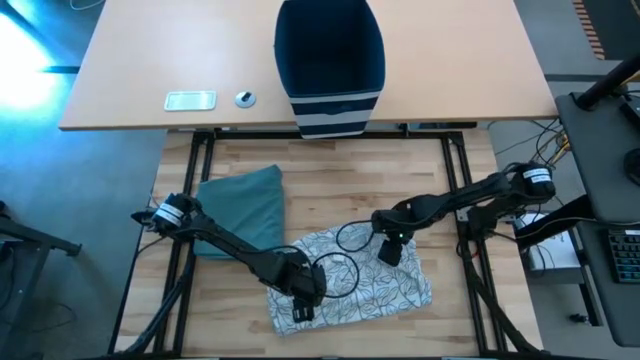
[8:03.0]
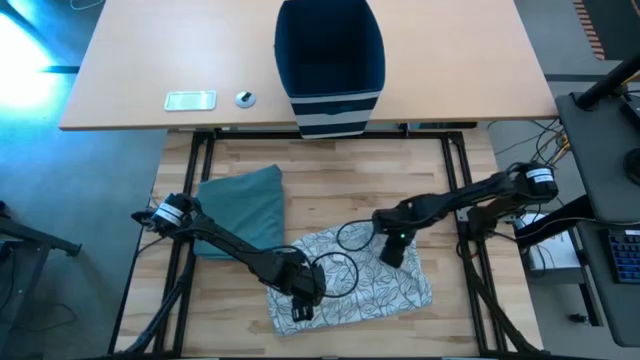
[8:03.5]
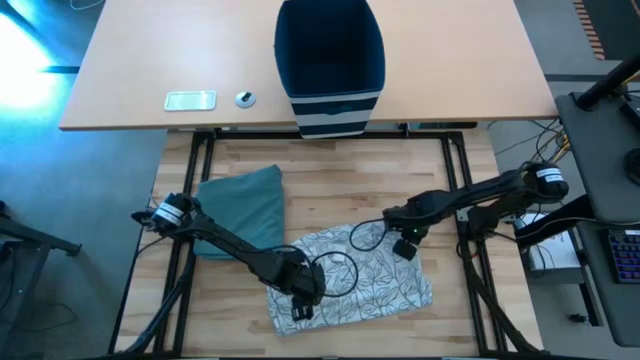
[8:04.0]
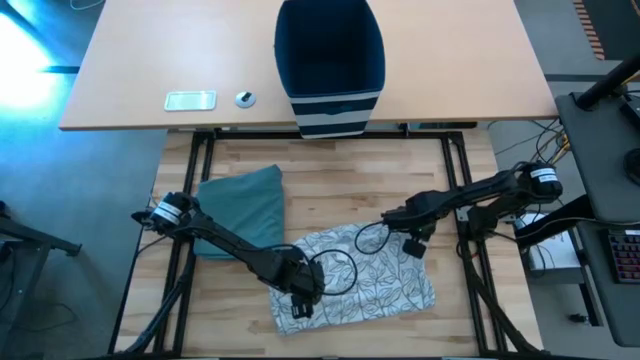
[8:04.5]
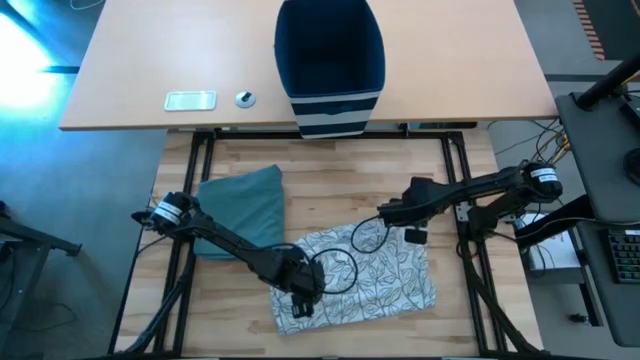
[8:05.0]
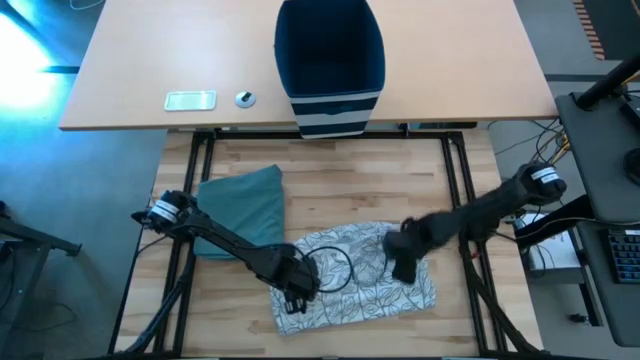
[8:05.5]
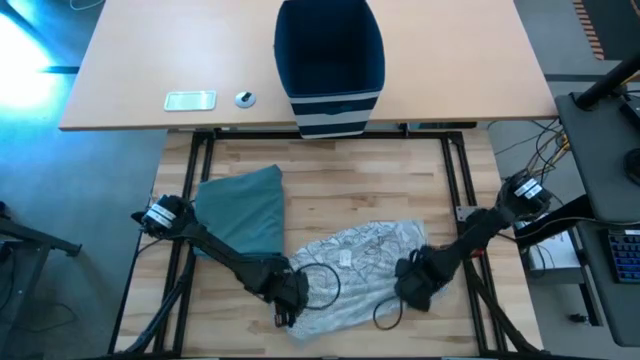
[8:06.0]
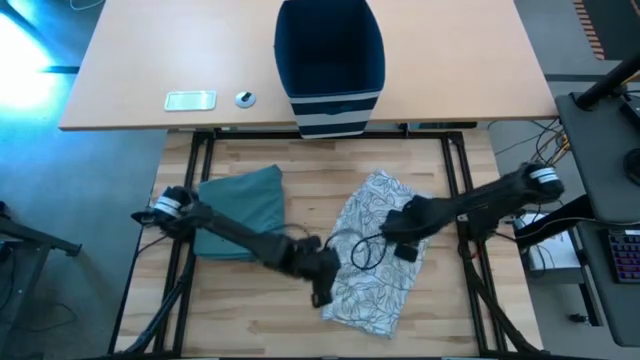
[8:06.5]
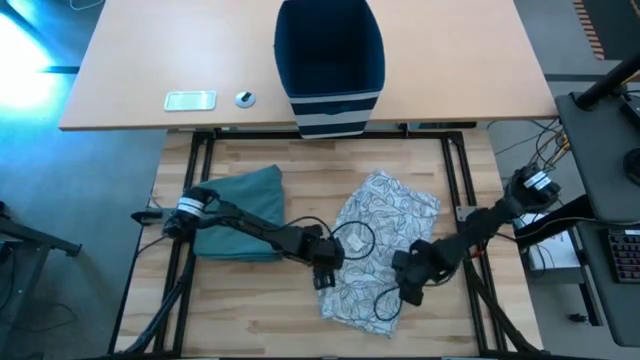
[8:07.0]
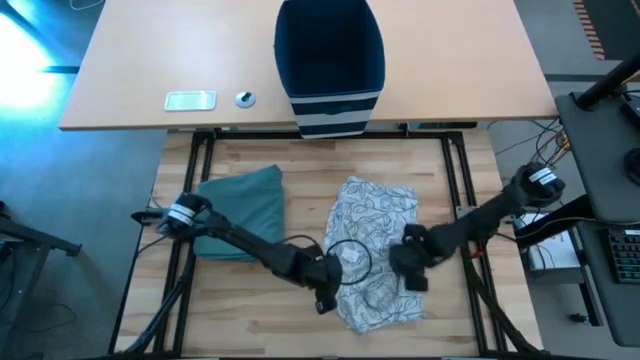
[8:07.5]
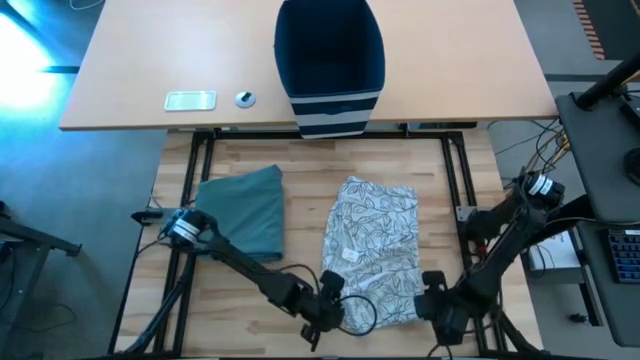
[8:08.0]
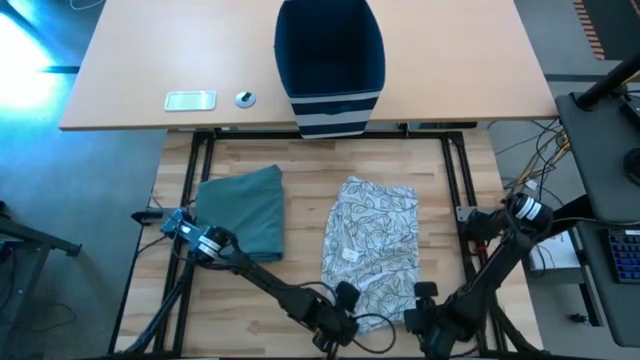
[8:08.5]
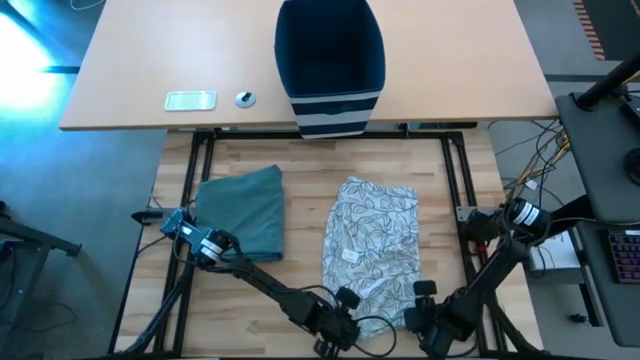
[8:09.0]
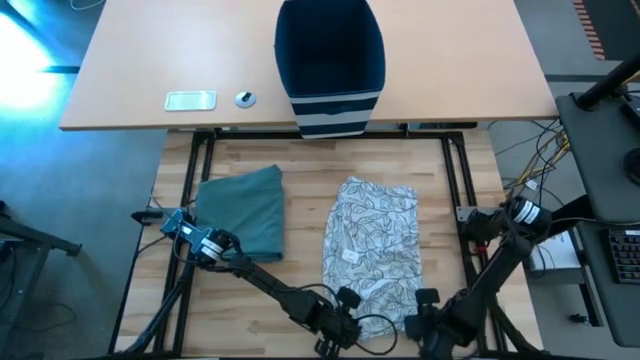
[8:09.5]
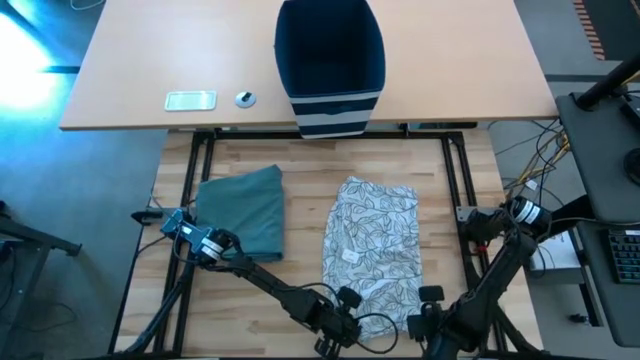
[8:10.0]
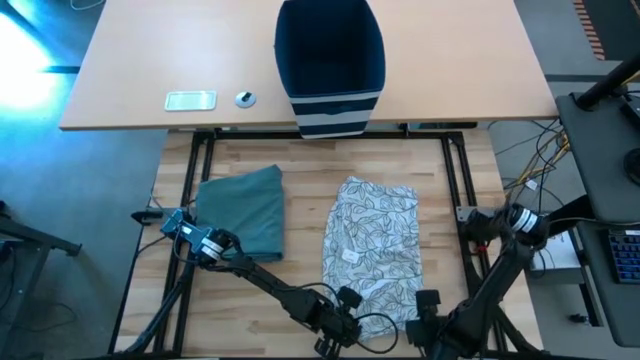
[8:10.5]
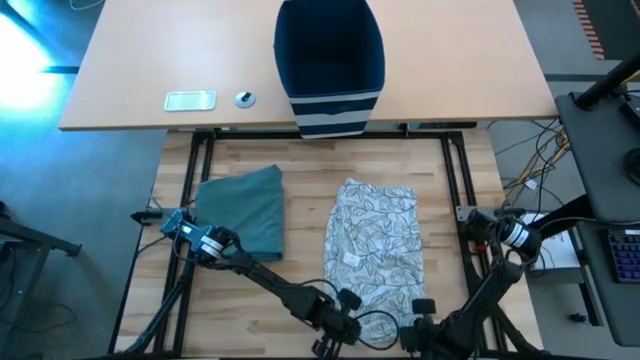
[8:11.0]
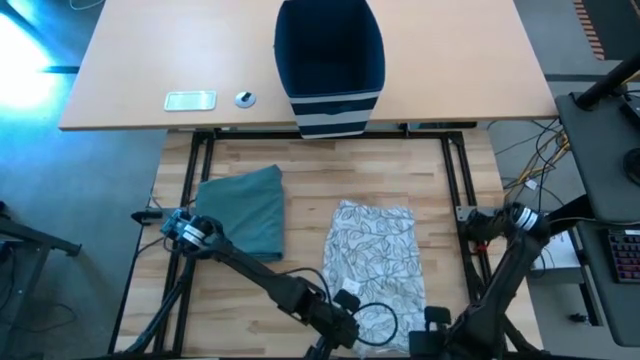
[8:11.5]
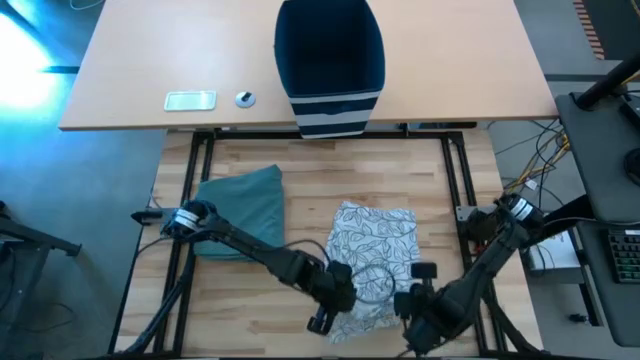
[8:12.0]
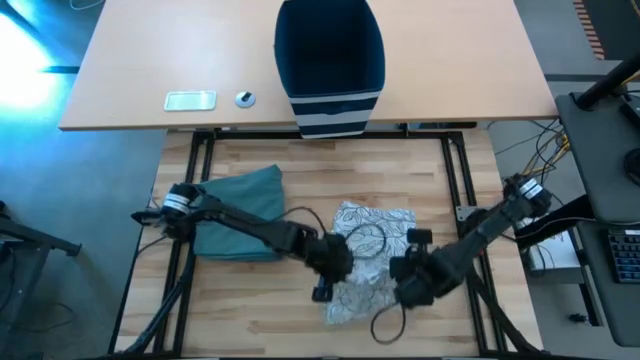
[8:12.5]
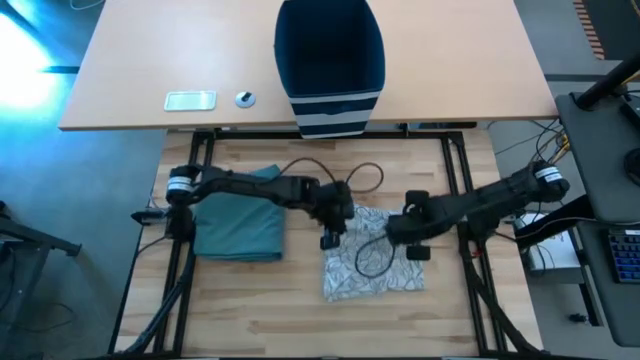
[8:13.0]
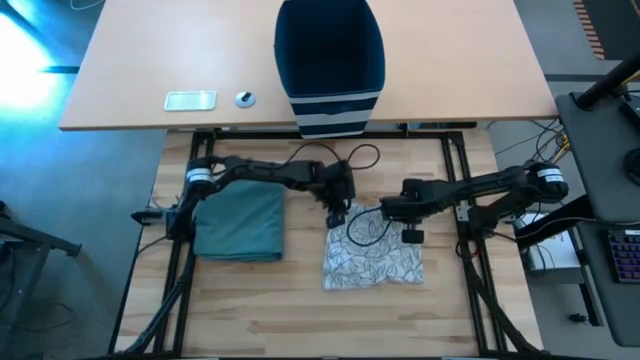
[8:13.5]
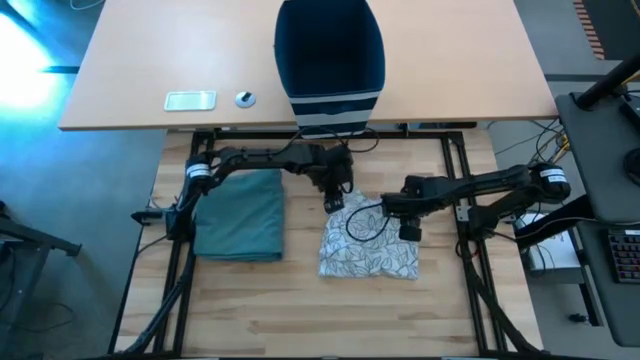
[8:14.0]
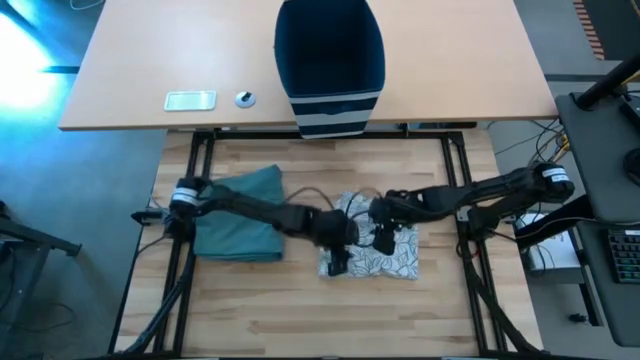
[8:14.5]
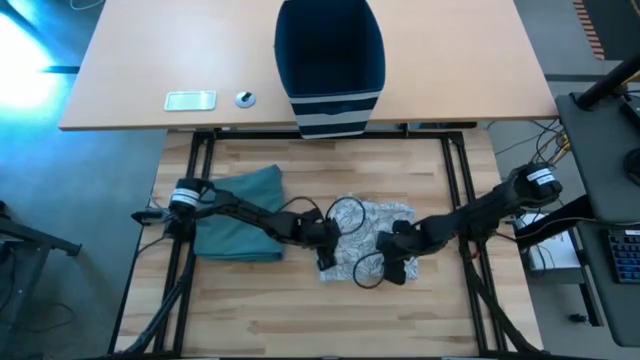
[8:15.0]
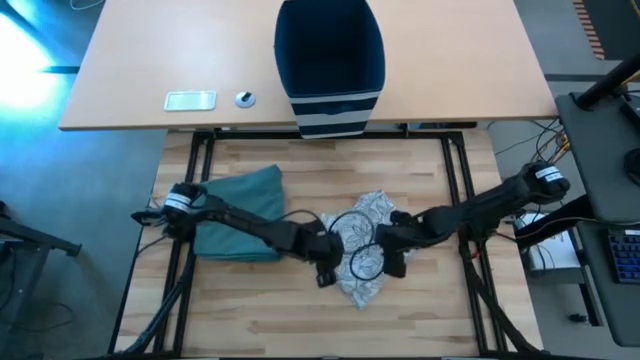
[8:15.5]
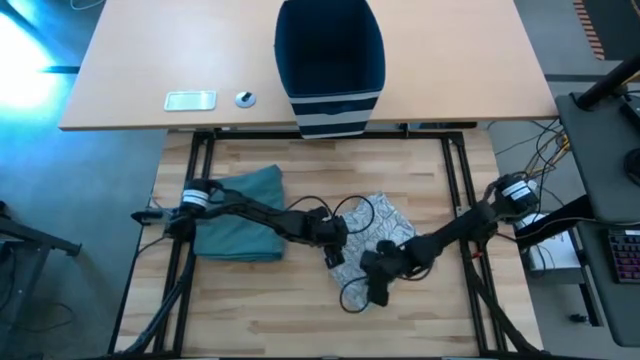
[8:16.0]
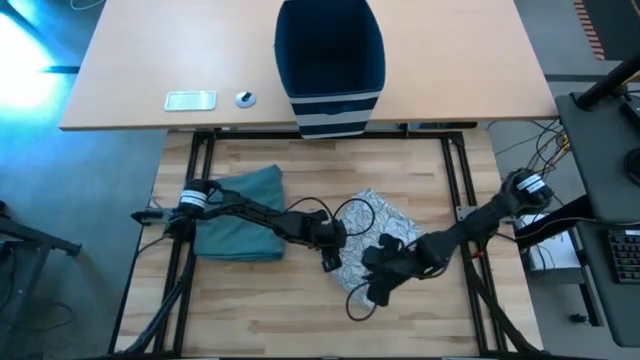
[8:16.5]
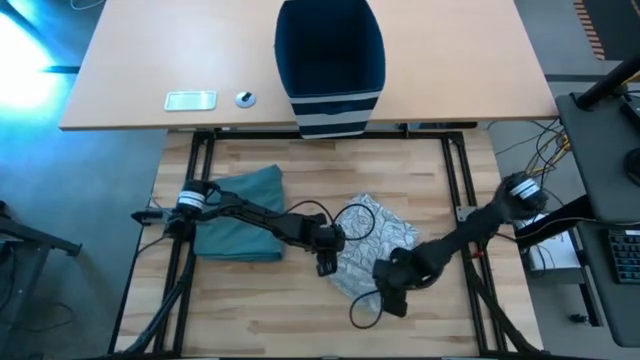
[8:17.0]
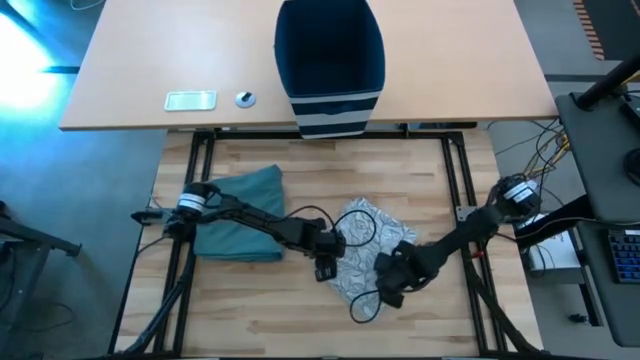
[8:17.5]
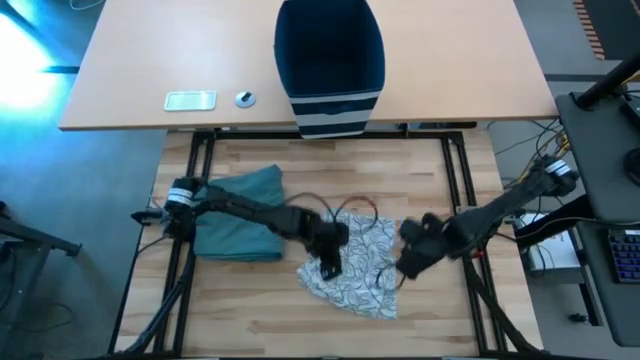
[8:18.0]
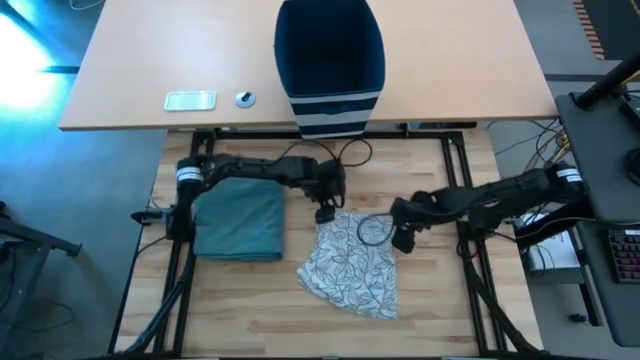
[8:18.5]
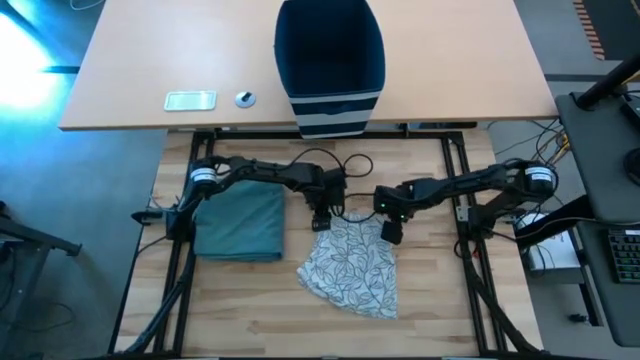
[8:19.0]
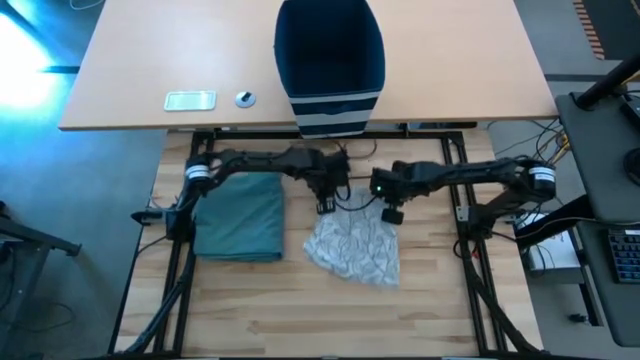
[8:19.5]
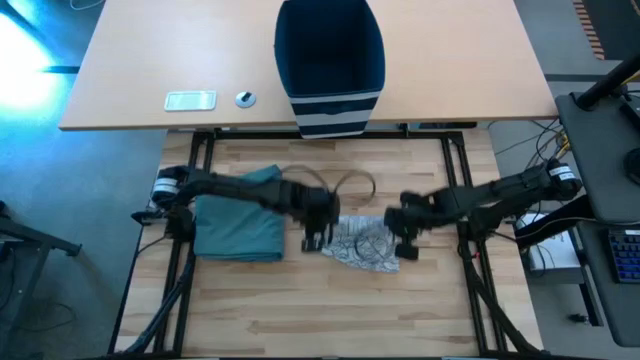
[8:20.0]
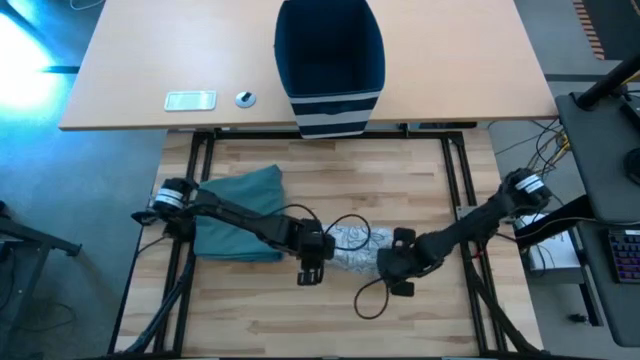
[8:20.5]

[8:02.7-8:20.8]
Task: Fold Laundry from Bin
Fold the white shirt

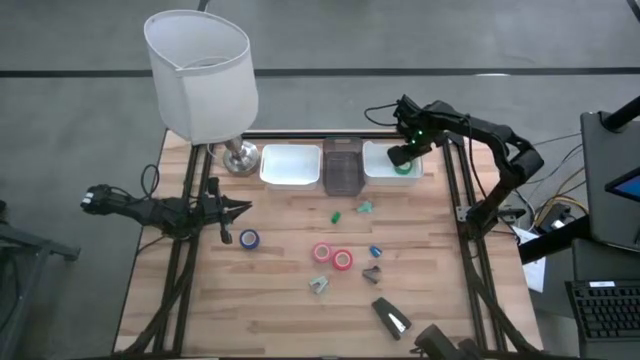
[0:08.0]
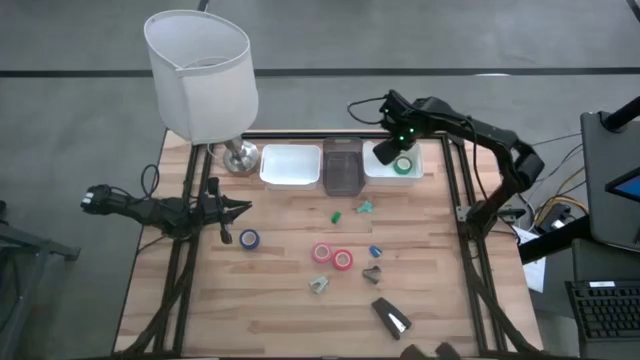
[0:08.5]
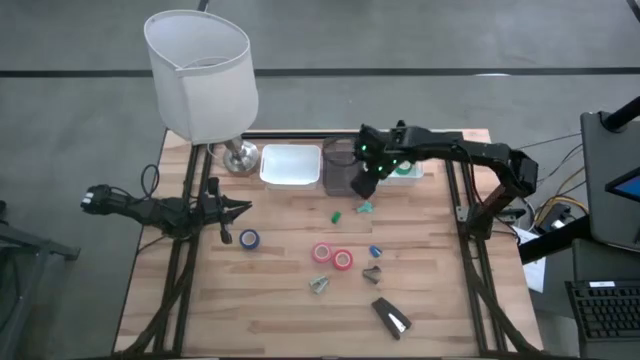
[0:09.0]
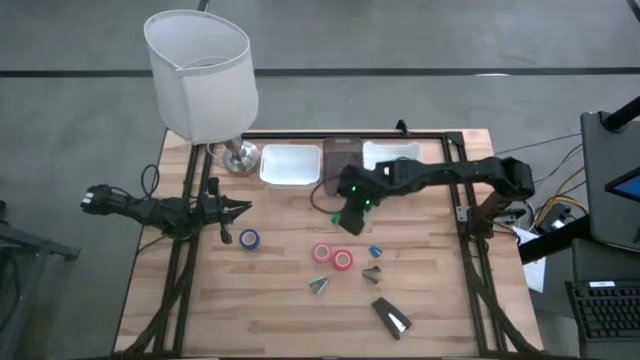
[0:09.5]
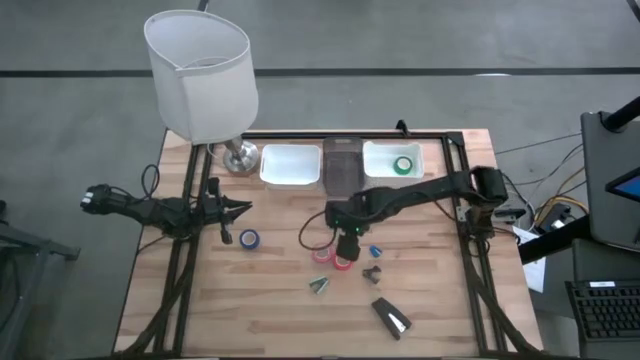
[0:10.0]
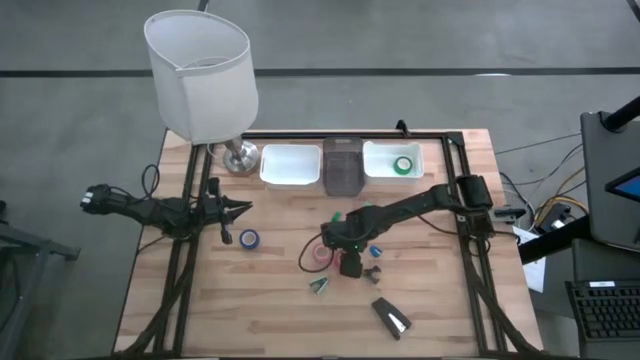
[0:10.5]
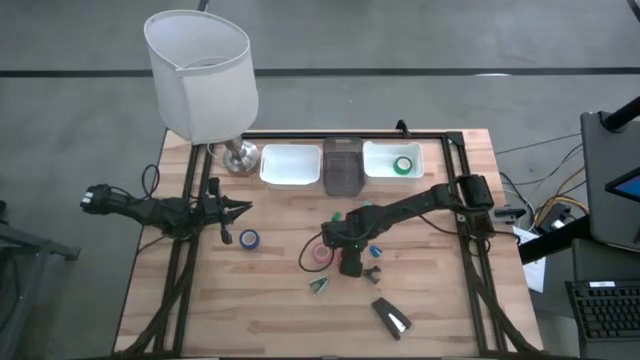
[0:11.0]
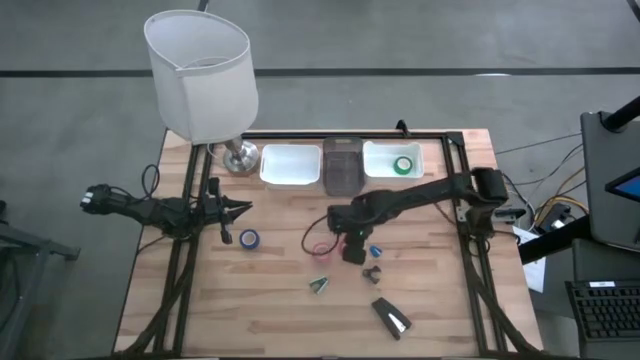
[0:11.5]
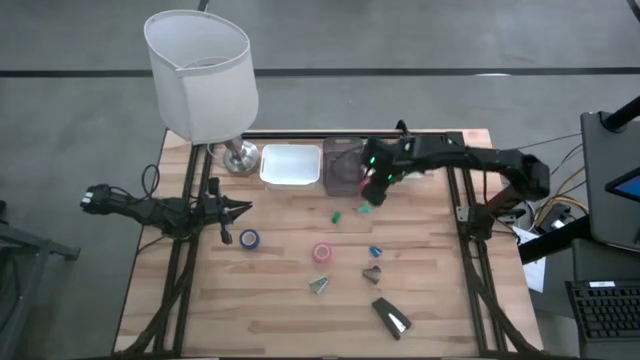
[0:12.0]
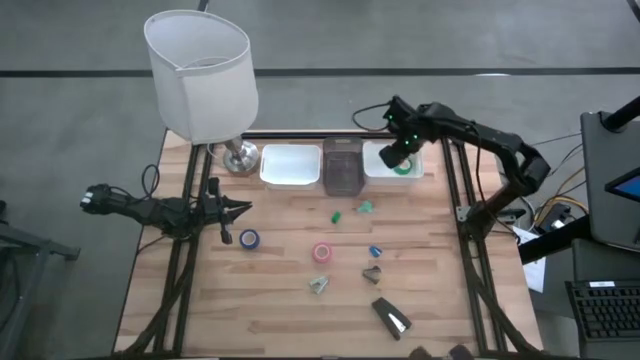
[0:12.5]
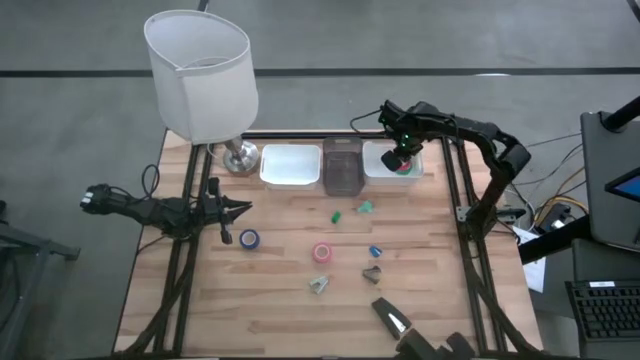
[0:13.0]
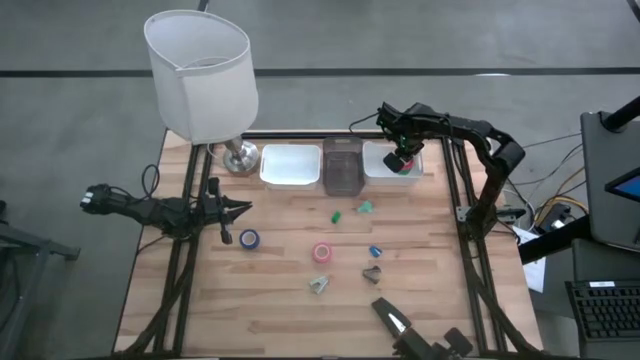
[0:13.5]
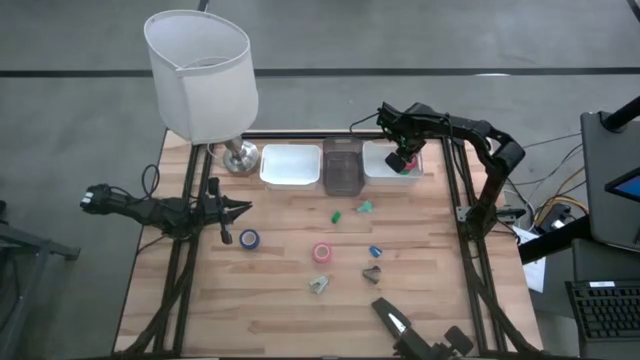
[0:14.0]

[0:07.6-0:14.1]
Task: Pick and place Stapler, Stapler remover, tape
Put the red tape into the right white bin
